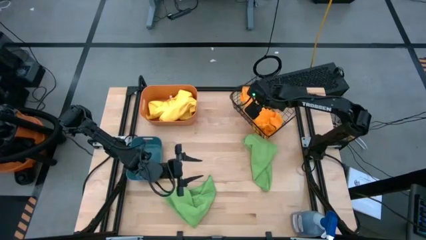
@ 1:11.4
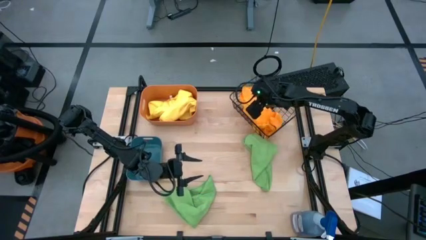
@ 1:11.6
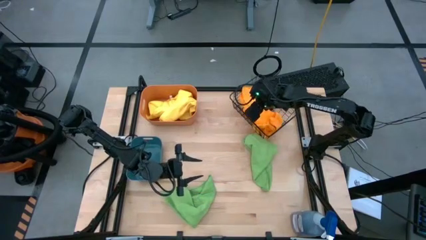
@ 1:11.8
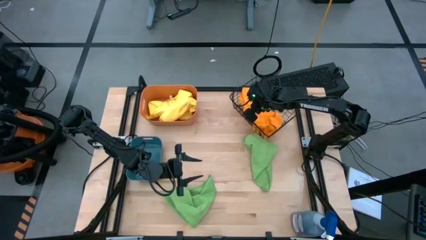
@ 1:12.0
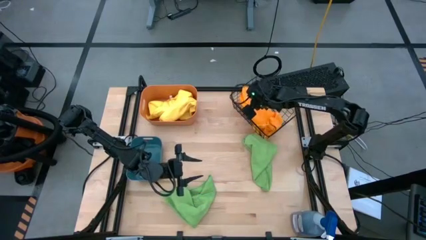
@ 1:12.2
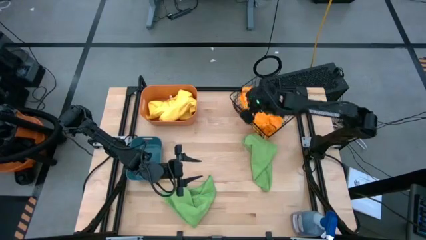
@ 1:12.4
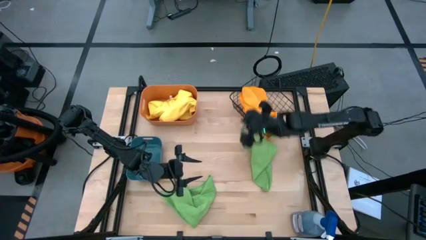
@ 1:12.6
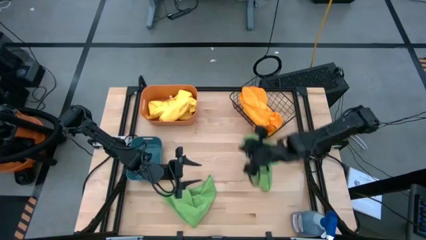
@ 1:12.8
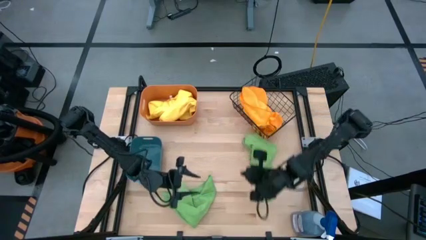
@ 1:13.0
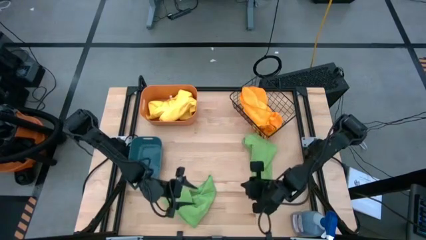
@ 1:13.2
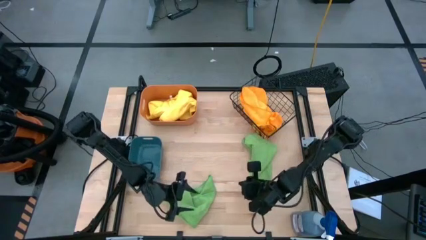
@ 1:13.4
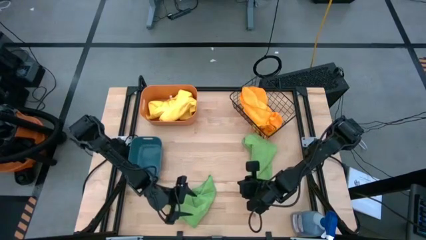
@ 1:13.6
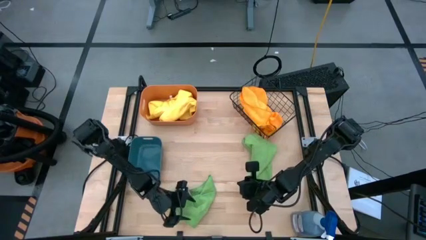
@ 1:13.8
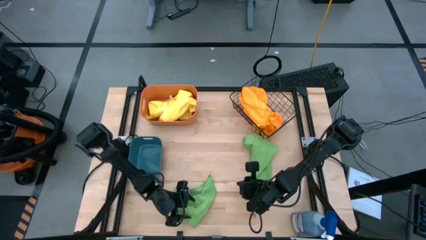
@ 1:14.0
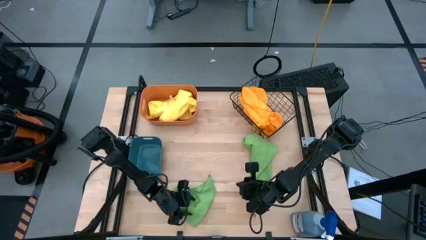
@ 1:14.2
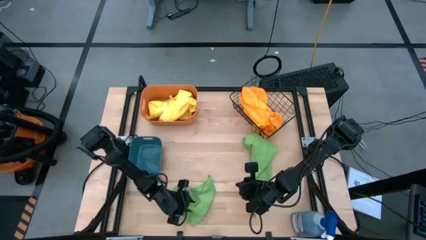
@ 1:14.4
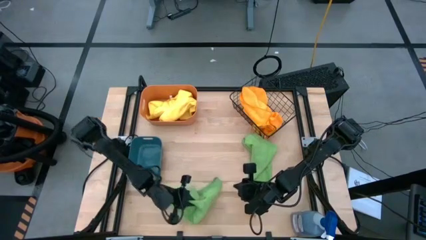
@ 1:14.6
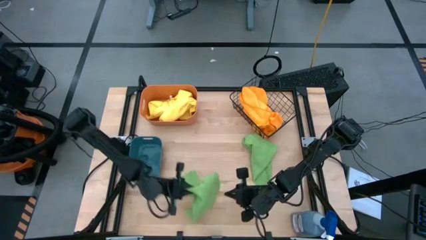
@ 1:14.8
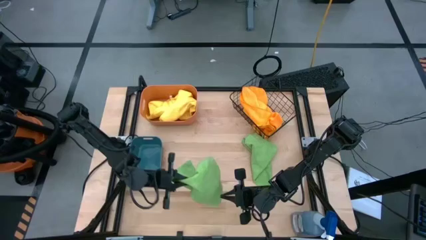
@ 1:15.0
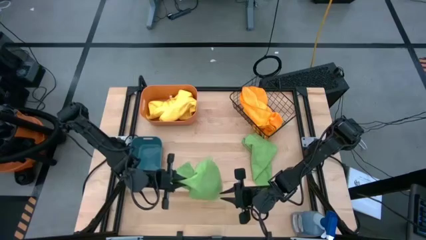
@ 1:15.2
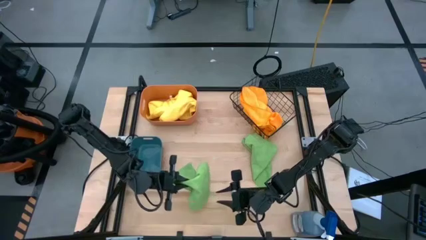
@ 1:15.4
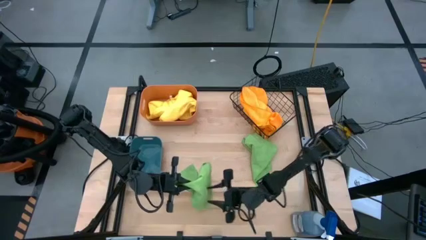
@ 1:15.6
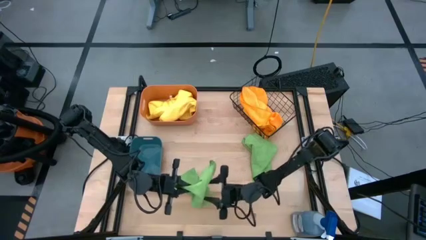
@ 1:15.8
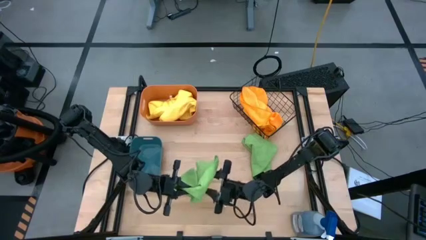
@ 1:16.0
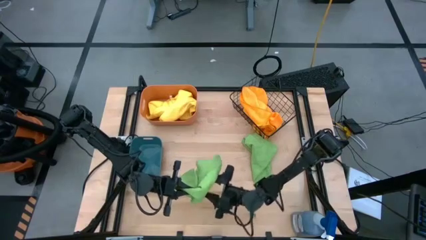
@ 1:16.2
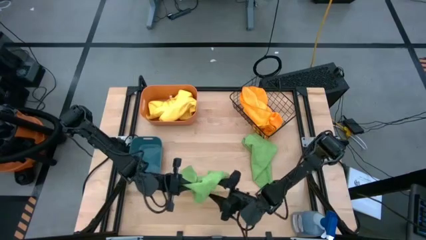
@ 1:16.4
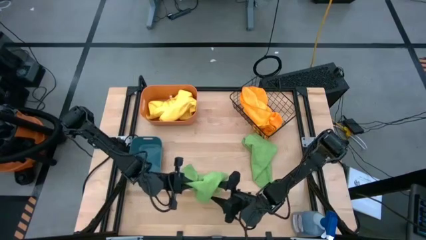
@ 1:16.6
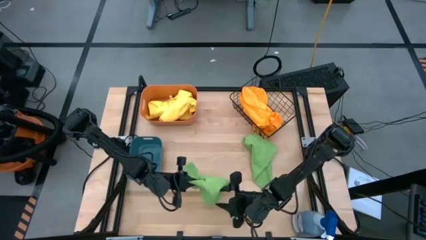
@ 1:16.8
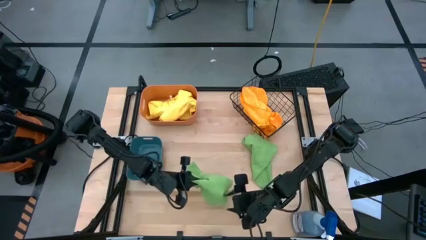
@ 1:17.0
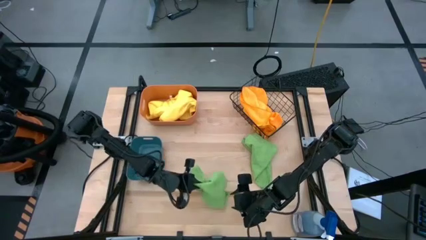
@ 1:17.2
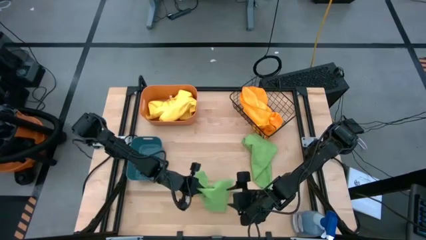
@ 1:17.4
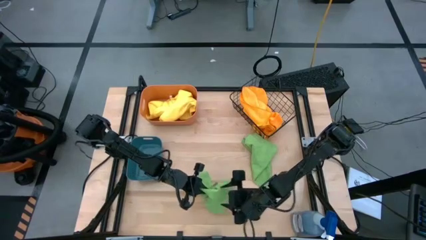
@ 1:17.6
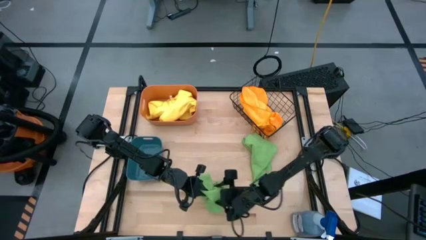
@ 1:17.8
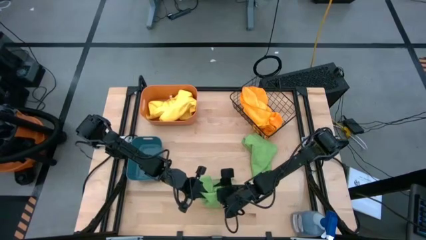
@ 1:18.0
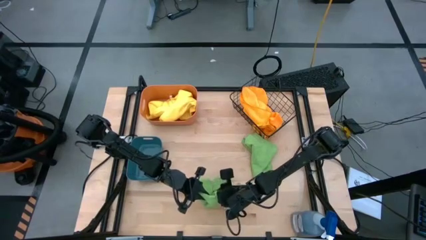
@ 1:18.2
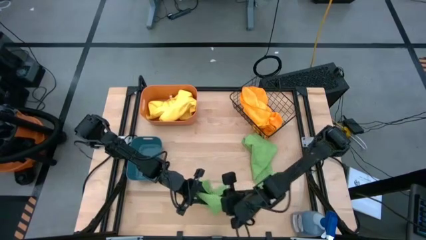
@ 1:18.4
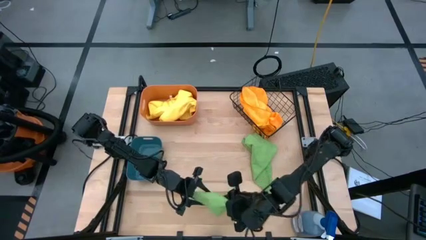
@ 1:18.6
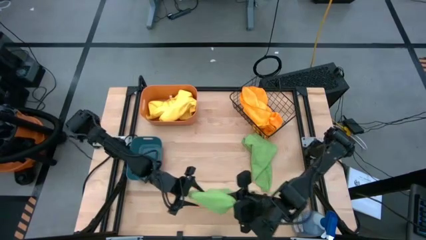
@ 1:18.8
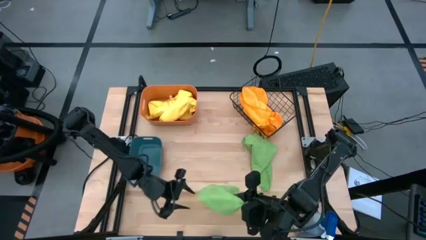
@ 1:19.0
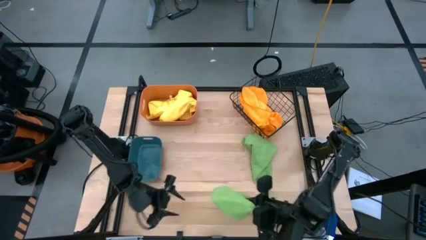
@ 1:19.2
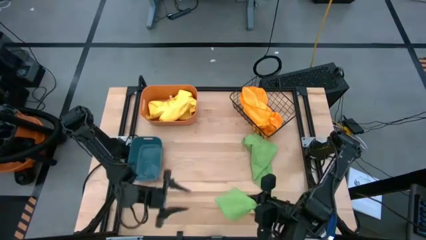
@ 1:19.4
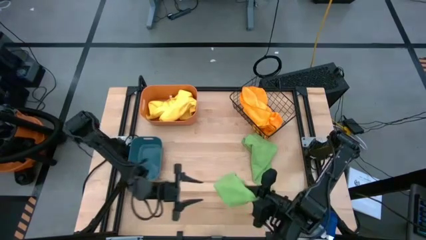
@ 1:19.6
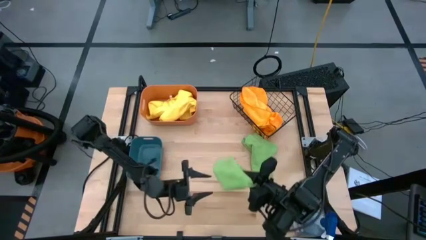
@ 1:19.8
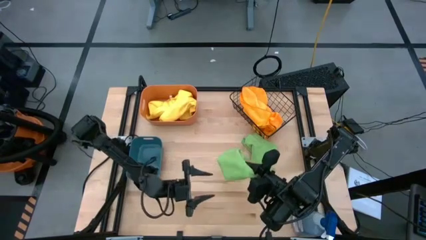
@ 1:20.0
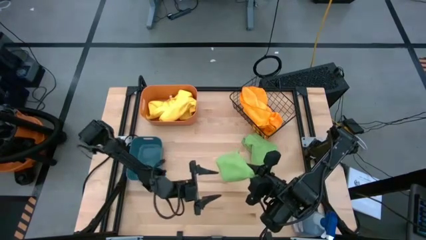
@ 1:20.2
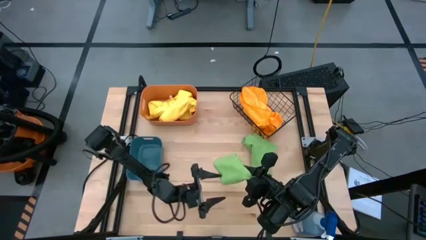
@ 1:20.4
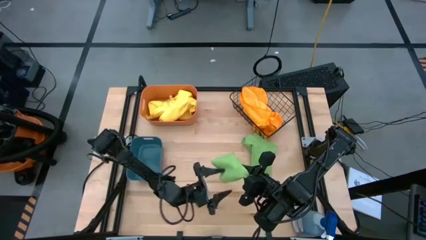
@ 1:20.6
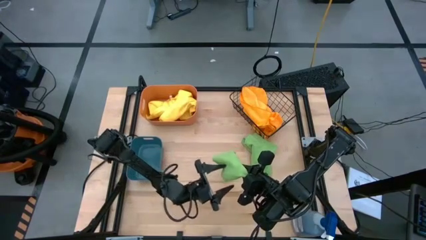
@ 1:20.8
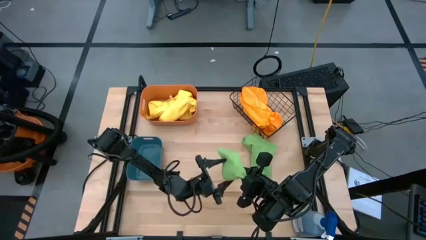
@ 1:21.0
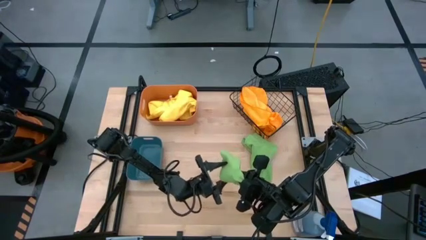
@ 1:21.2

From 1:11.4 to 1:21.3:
Task: Sort microfiber towel by color & place in baskets
Put the left green microfiber towel into the blue bin
